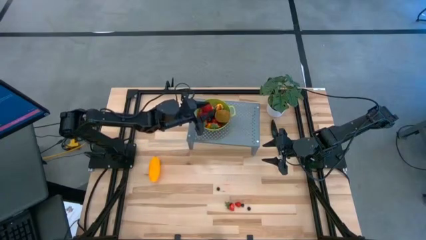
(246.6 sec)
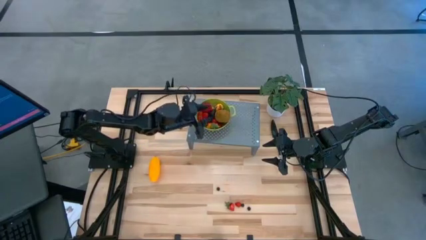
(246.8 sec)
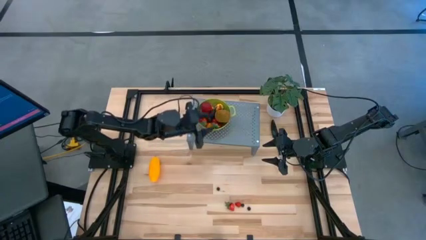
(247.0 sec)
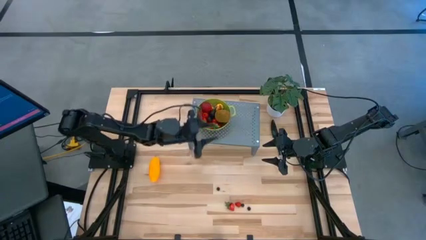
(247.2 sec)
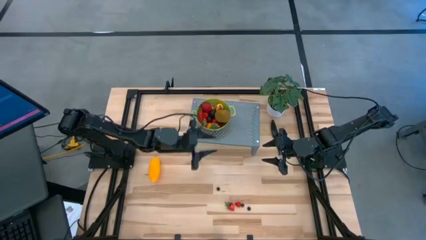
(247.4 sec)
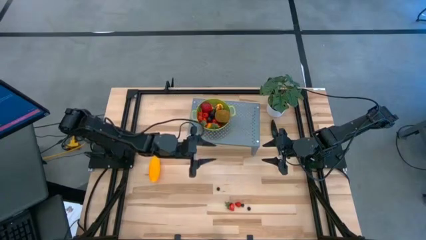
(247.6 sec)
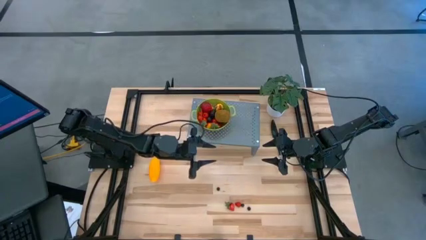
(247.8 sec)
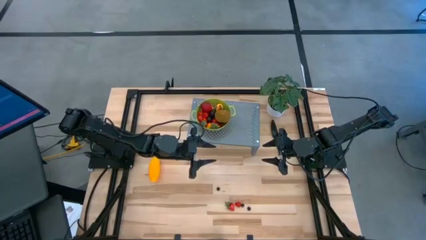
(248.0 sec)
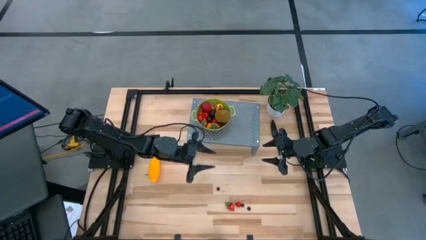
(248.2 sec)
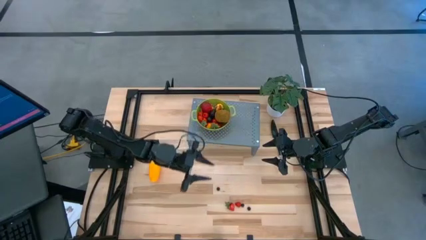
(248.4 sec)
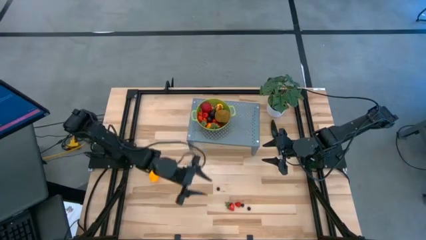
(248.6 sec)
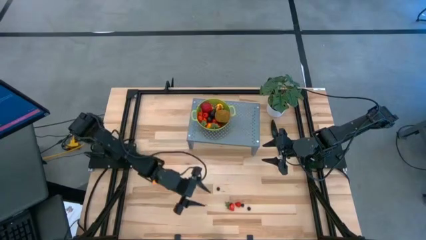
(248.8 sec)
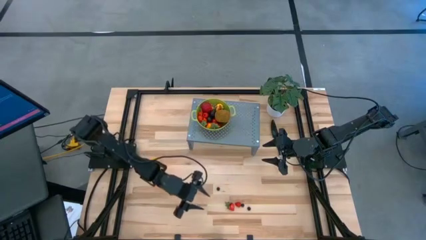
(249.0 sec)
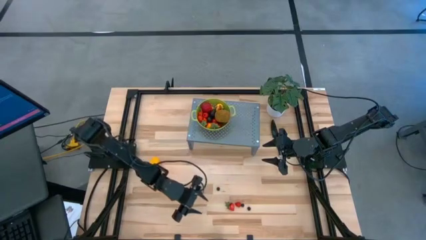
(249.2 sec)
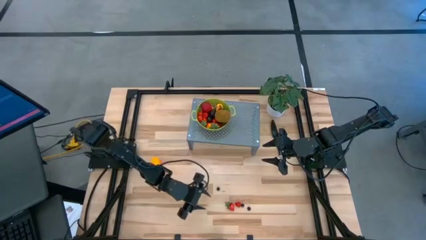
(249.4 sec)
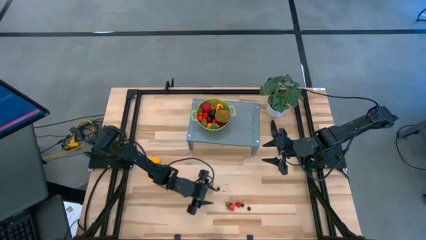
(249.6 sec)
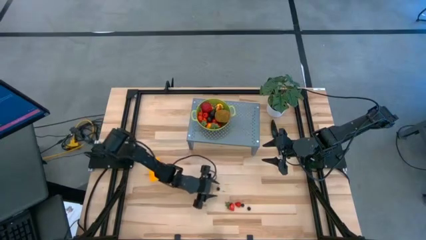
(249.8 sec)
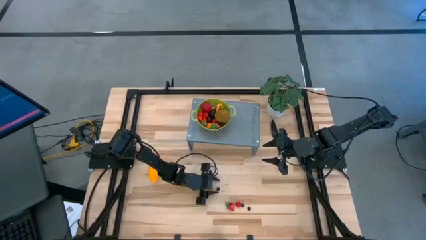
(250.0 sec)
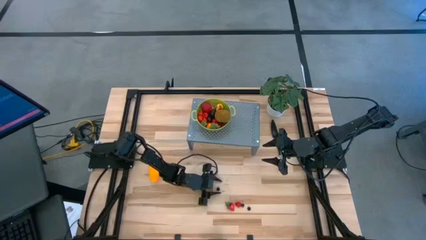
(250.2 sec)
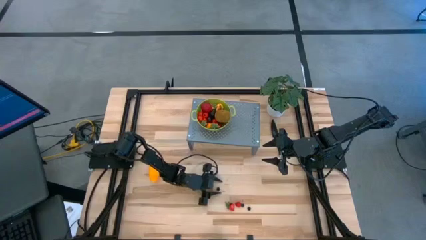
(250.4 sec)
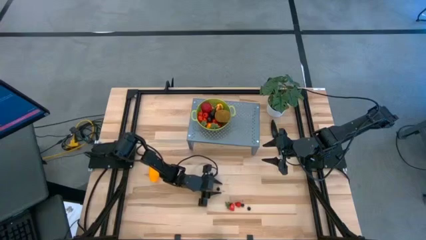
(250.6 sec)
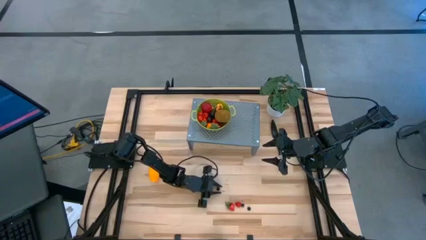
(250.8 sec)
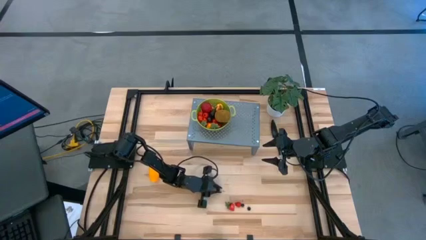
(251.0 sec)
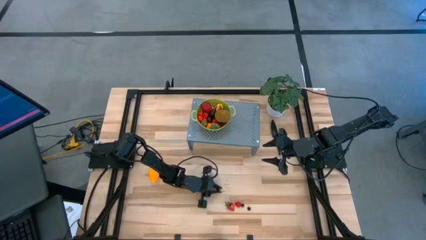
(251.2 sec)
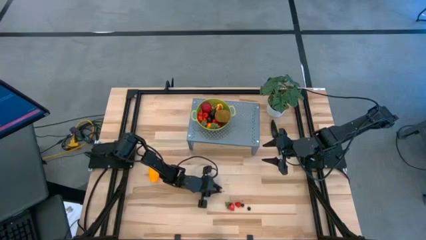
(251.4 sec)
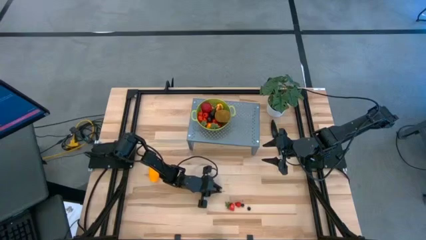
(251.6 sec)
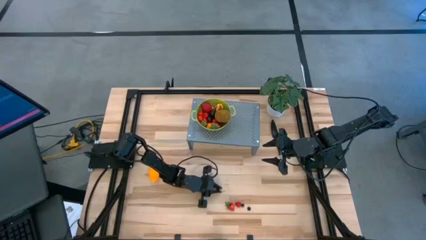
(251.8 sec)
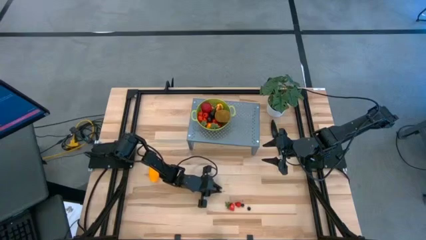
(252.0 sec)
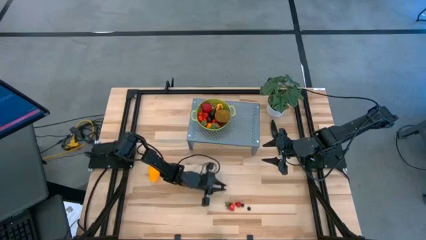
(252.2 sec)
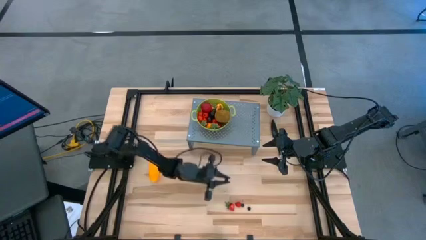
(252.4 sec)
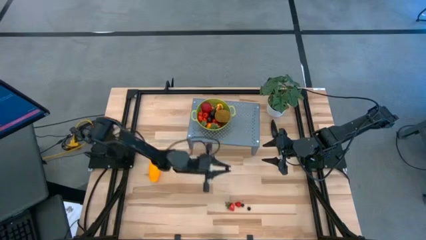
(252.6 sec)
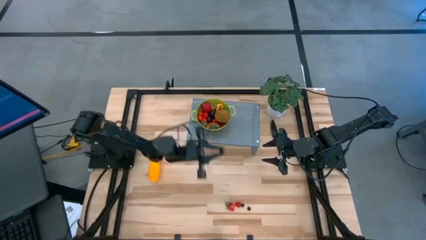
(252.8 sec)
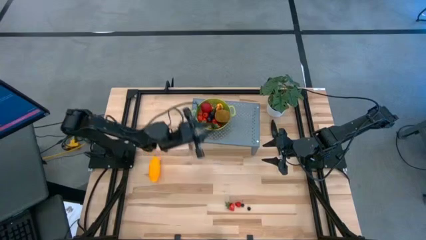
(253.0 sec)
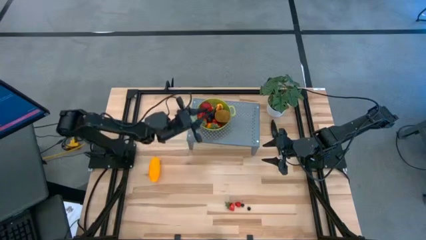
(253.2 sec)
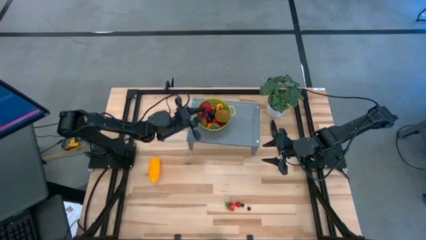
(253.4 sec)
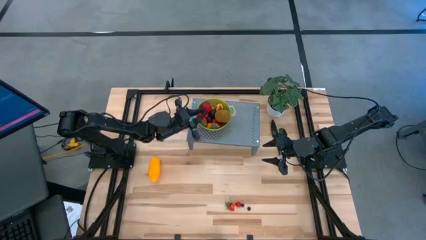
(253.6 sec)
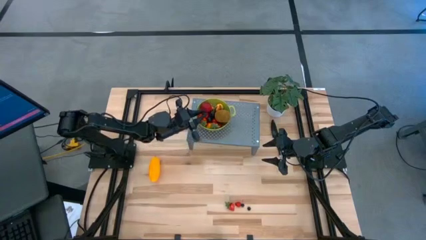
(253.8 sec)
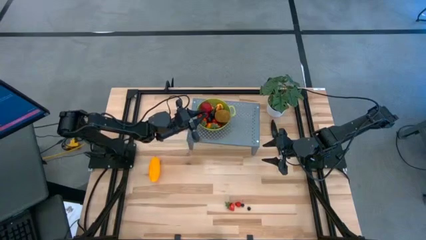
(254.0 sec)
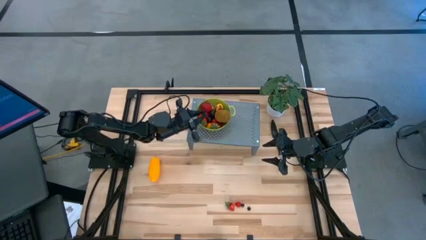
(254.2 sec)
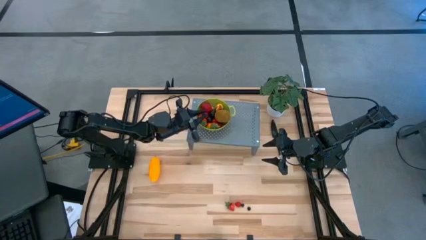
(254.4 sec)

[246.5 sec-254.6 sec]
Task: Pick & Place Fruit
Put the blueberry into the green strainer bowl on the shelf

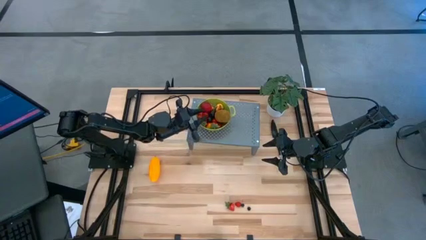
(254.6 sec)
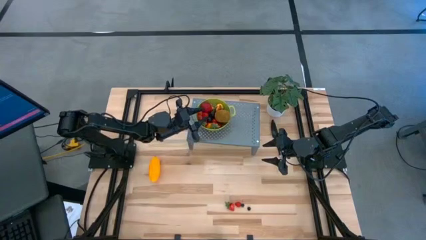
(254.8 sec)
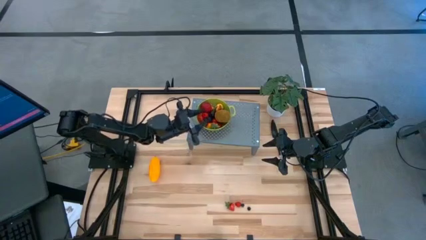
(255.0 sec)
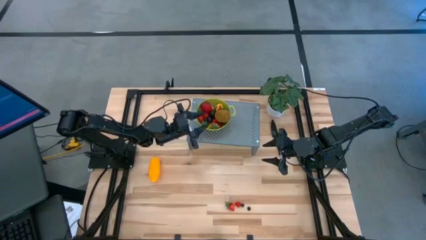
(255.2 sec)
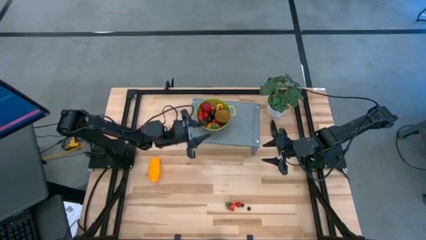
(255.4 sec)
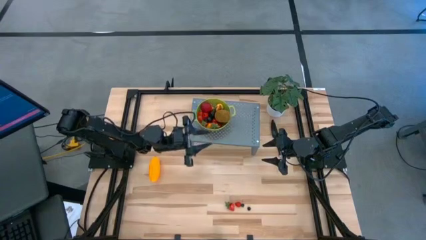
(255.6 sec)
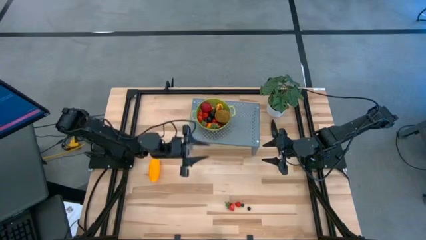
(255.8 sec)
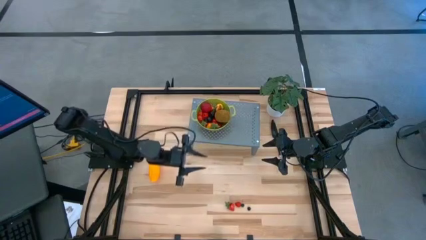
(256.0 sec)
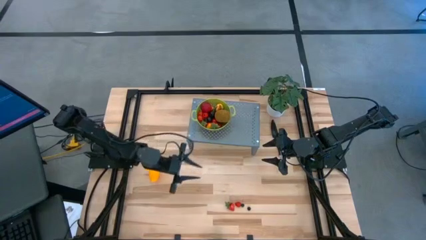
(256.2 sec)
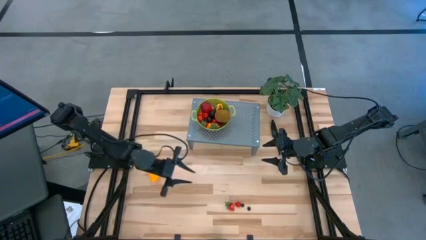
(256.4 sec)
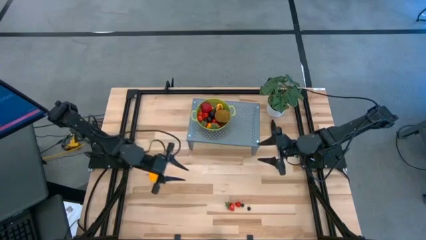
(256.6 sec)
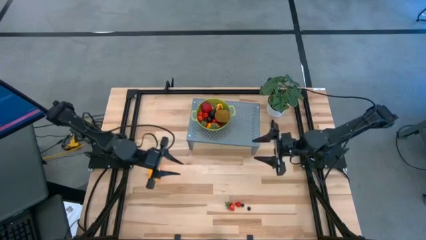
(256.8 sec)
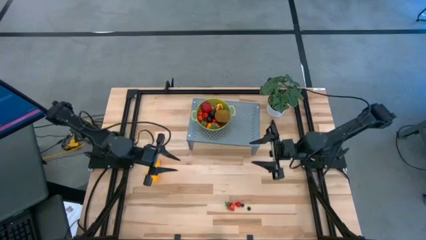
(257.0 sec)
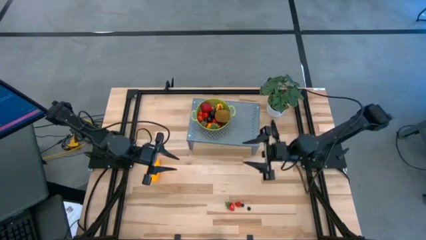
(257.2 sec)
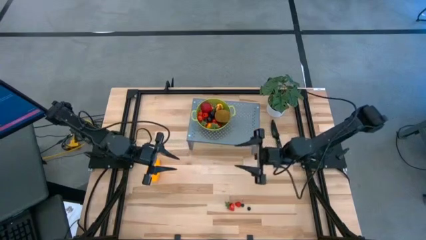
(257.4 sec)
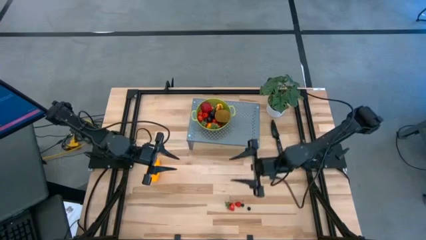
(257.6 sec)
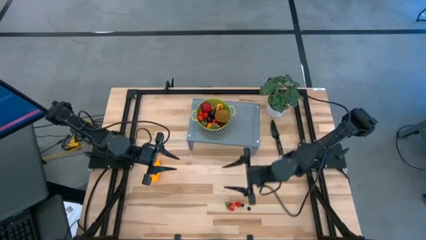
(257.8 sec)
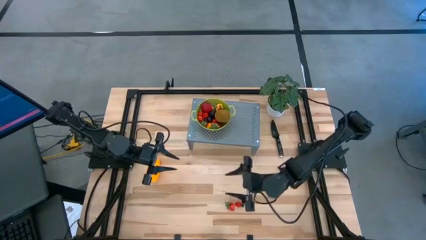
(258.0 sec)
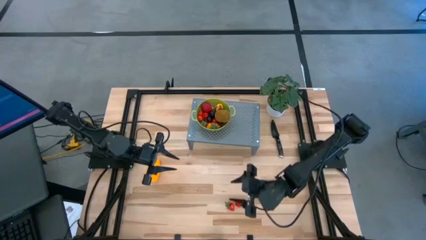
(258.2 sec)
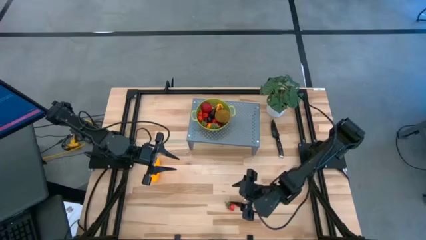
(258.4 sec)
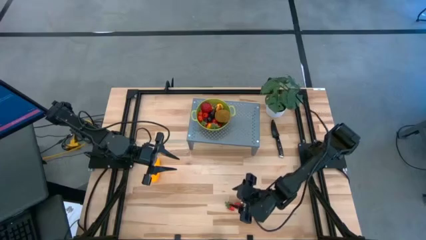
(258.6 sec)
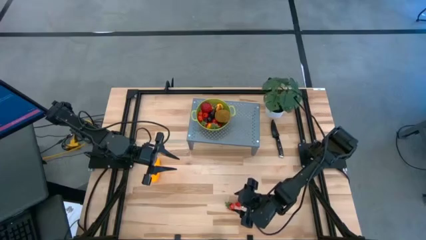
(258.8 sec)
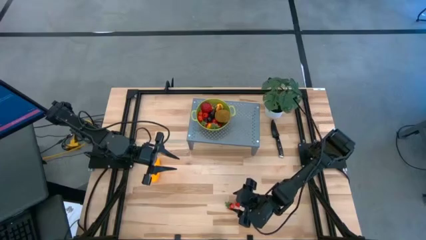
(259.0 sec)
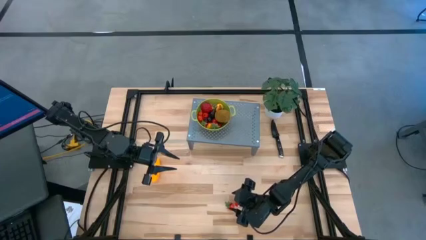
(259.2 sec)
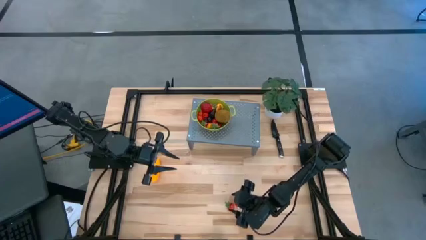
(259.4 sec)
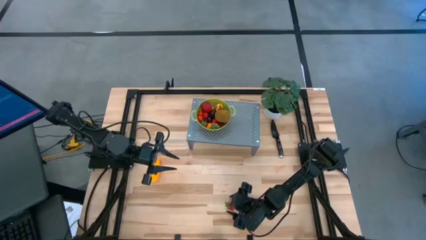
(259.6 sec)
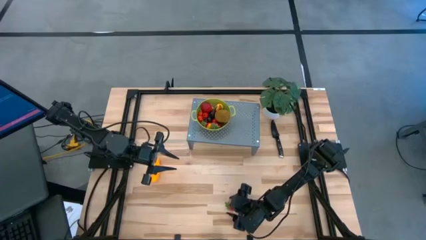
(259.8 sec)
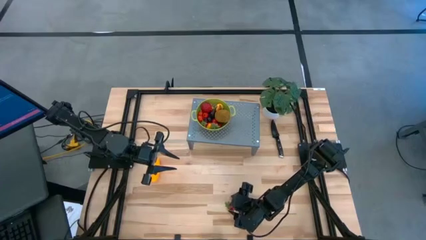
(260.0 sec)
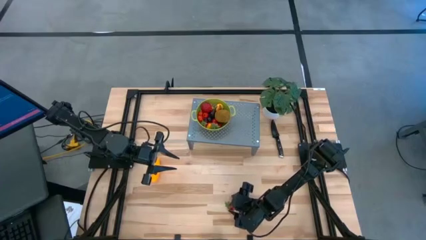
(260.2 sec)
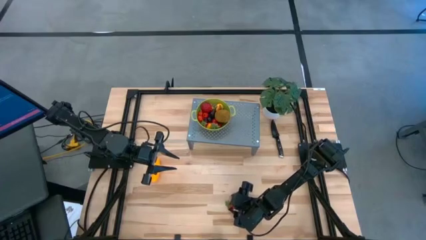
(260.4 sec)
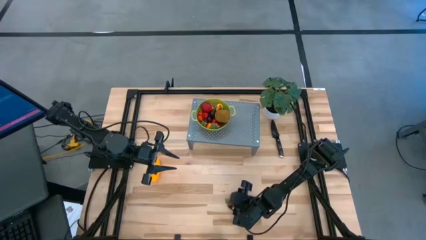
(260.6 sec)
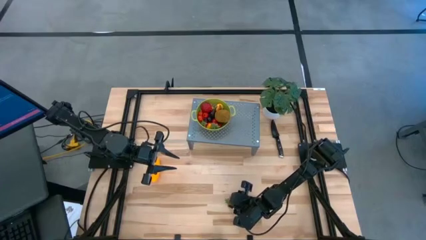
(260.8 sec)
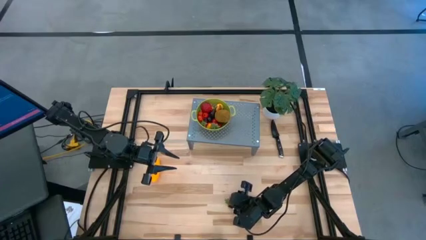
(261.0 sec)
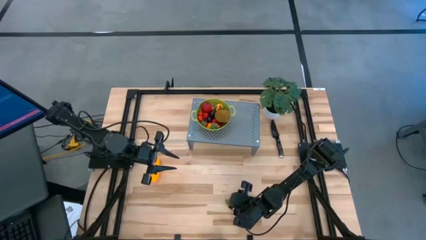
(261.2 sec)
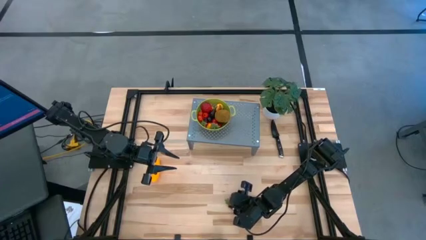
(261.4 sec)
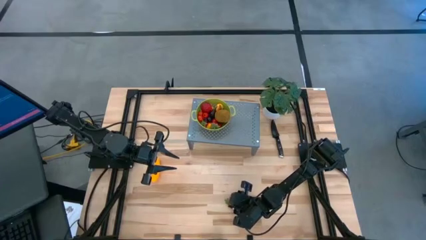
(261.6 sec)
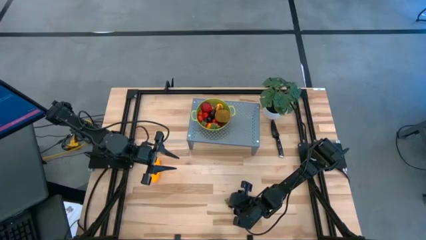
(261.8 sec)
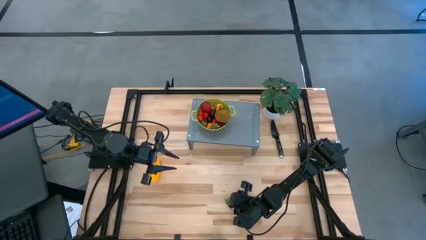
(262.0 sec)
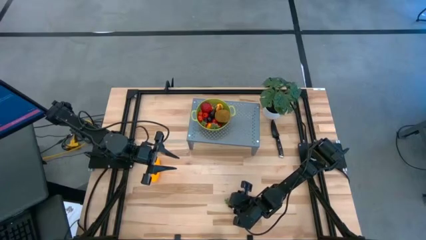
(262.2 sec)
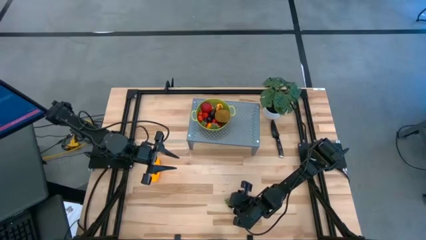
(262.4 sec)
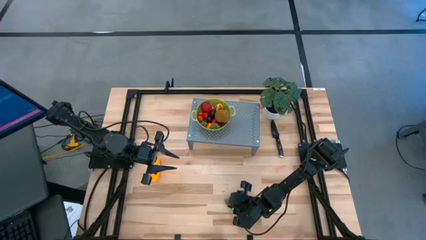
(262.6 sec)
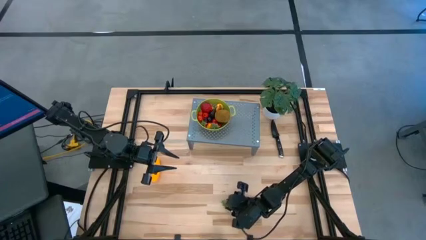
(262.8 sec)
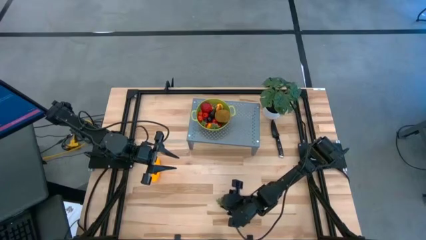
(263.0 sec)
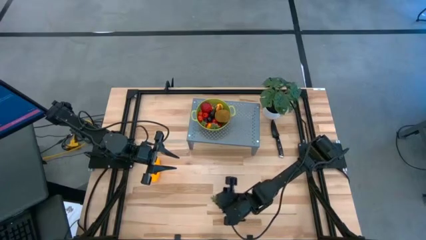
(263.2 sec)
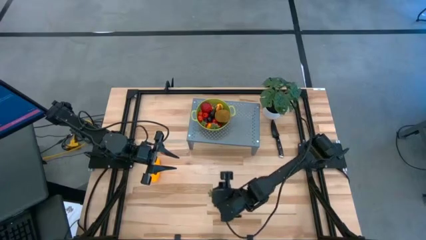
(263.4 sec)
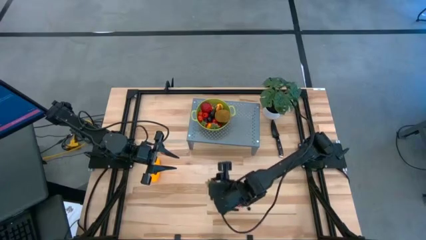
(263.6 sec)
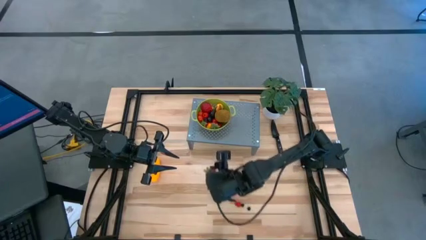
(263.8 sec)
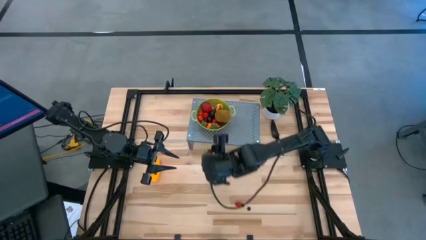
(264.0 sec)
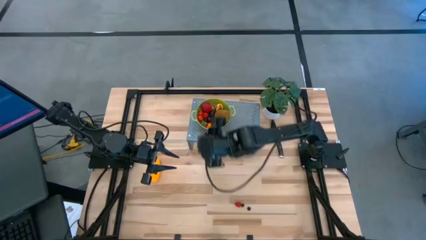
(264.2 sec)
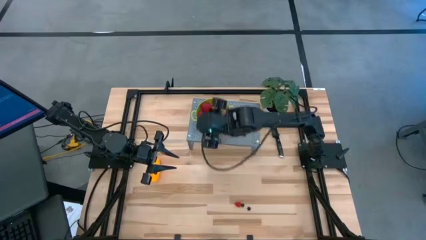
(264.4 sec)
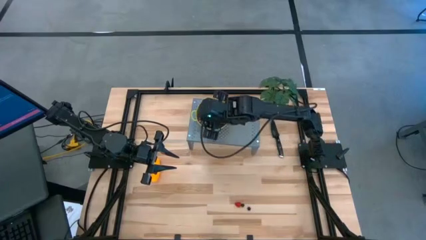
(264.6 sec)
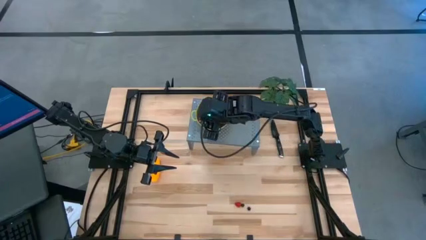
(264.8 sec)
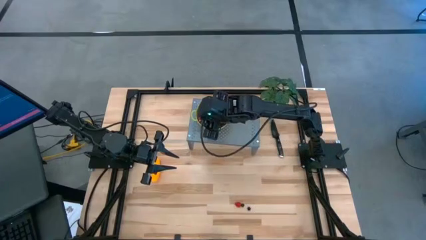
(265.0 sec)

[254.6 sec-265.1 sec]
Put the strawberry into the green strainer bowl on the shelf
